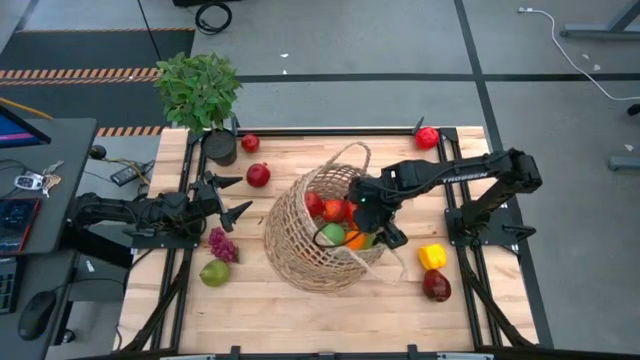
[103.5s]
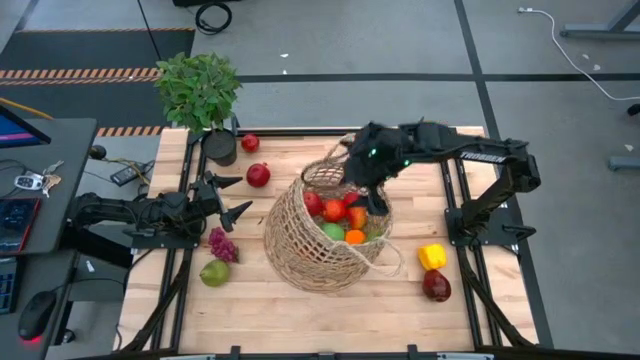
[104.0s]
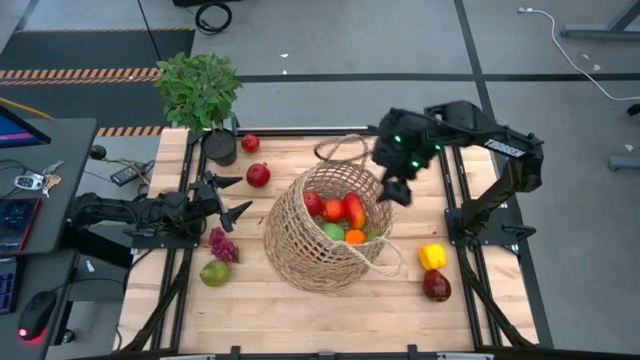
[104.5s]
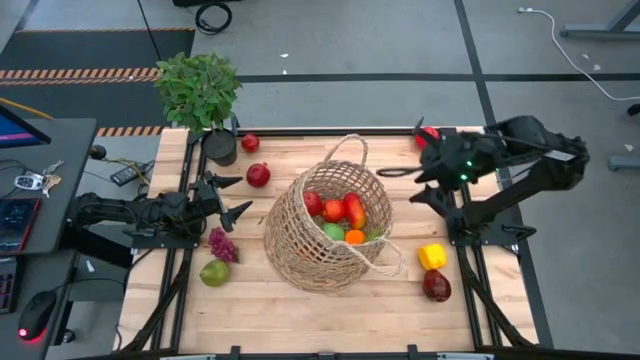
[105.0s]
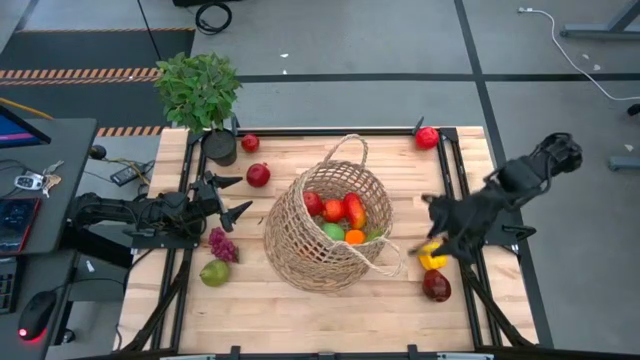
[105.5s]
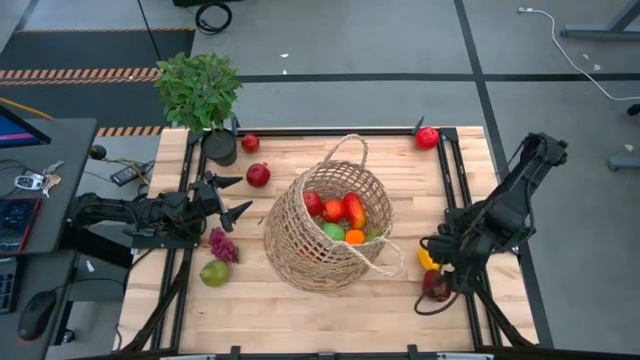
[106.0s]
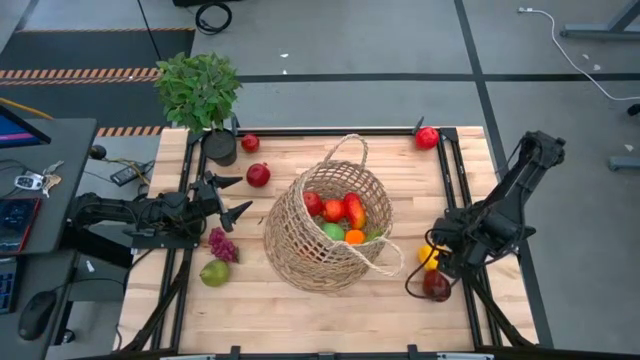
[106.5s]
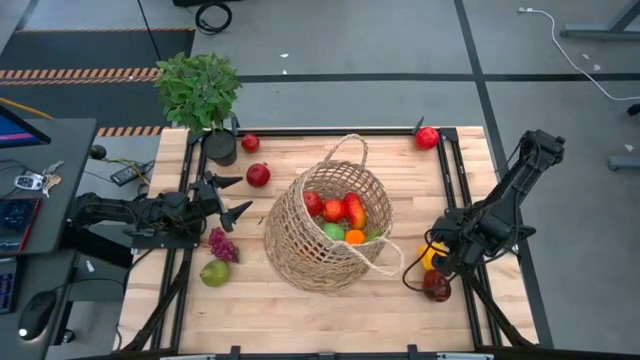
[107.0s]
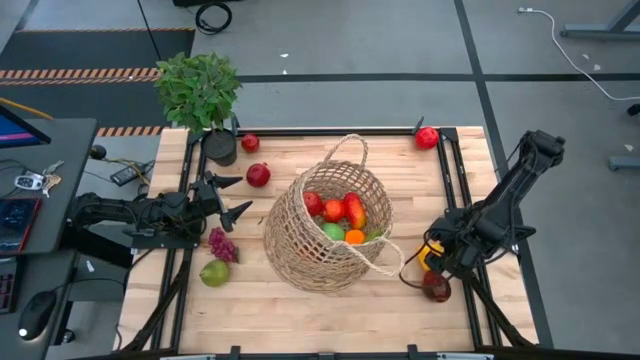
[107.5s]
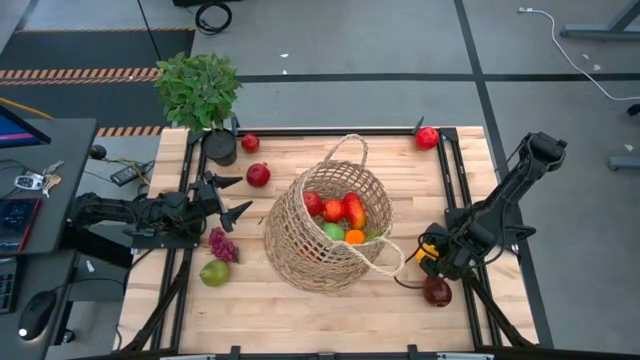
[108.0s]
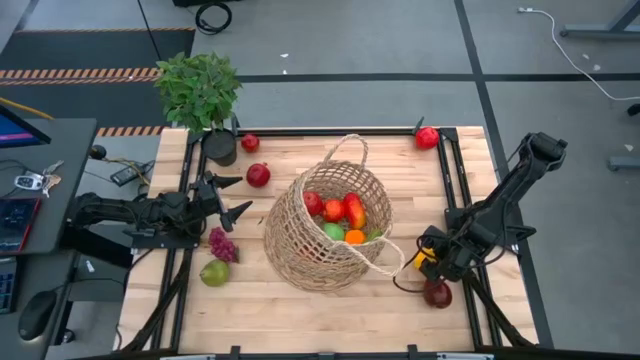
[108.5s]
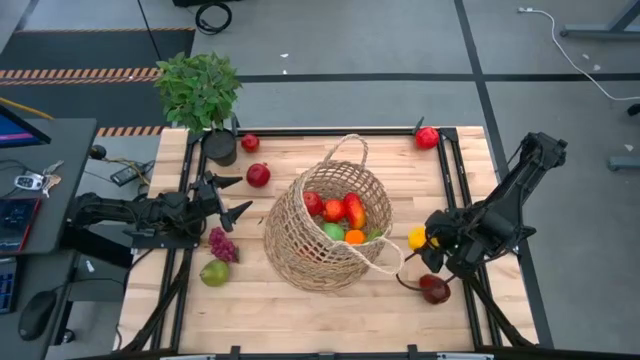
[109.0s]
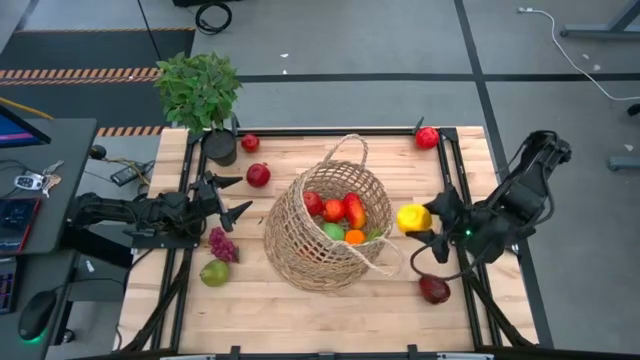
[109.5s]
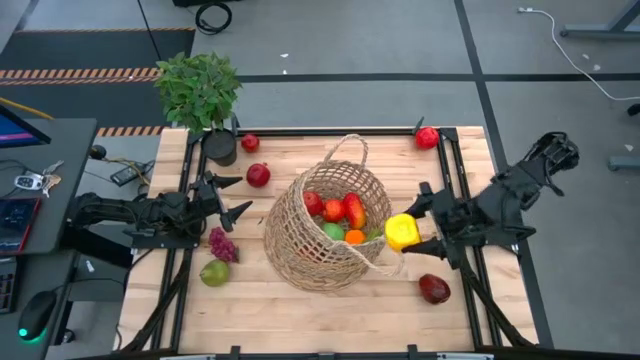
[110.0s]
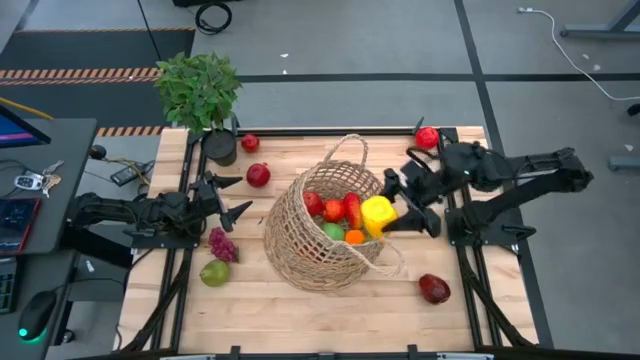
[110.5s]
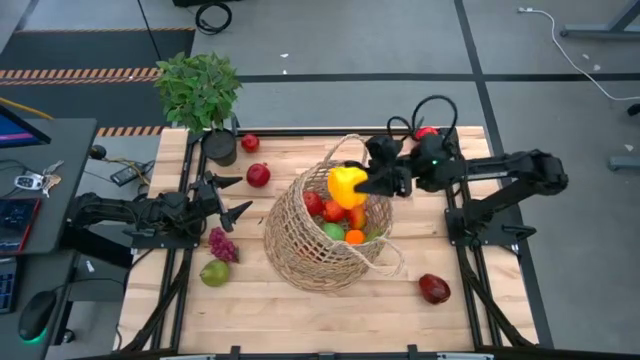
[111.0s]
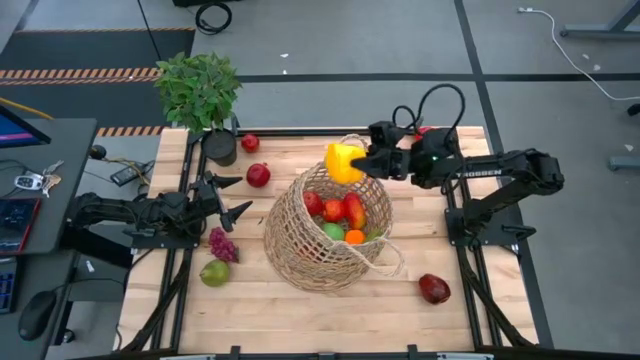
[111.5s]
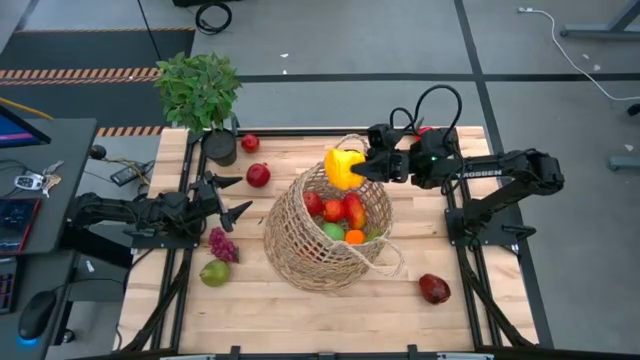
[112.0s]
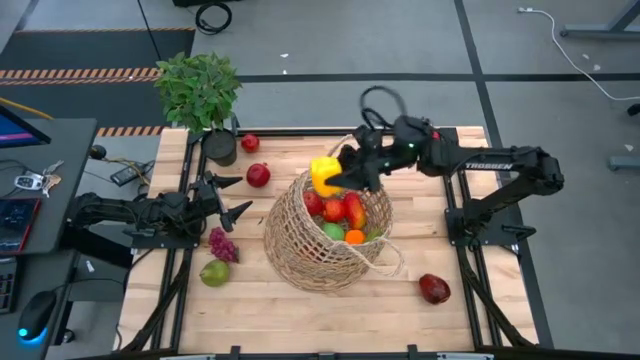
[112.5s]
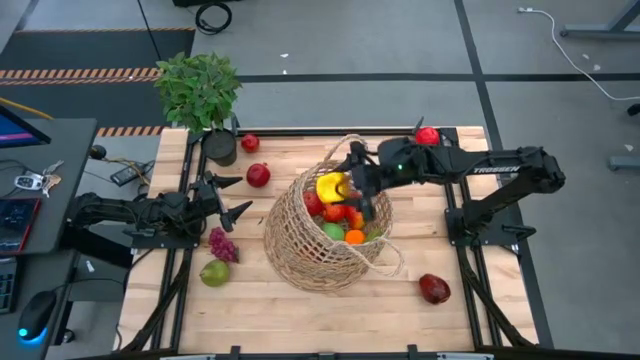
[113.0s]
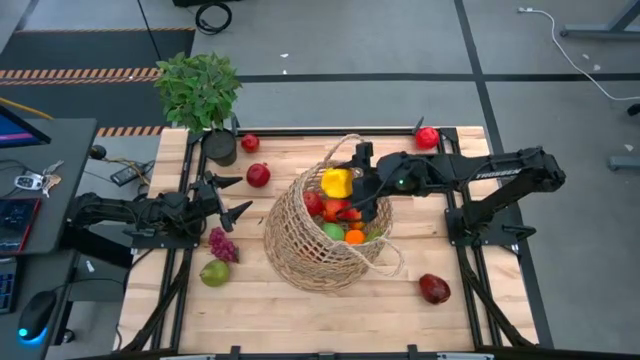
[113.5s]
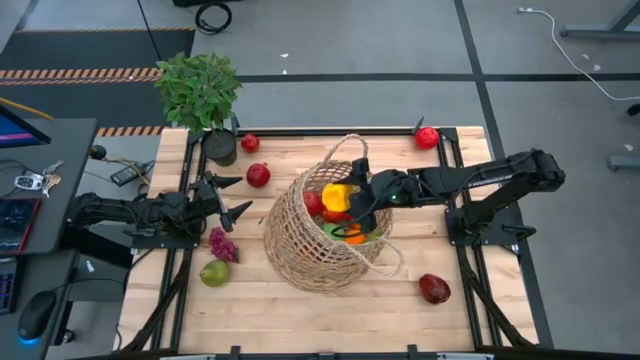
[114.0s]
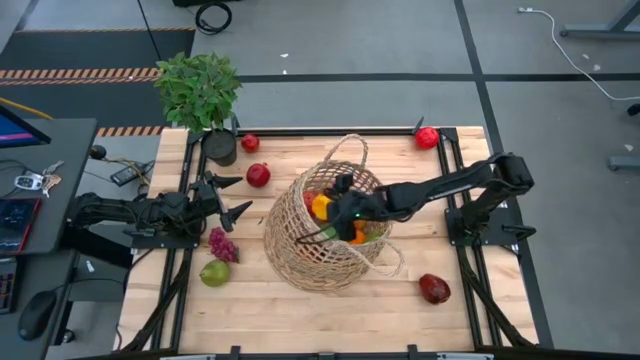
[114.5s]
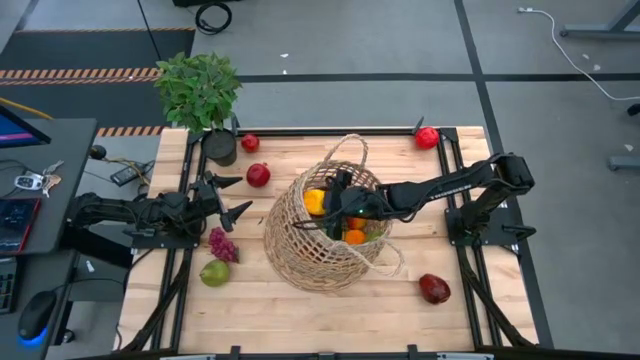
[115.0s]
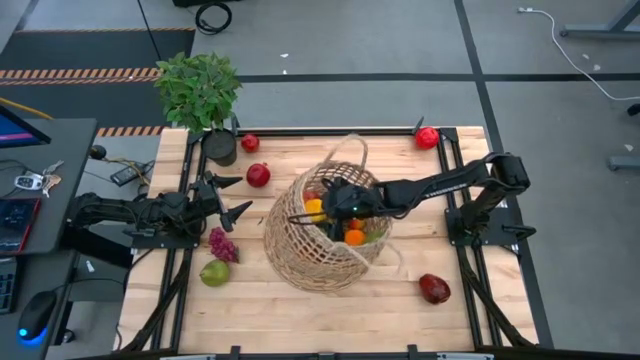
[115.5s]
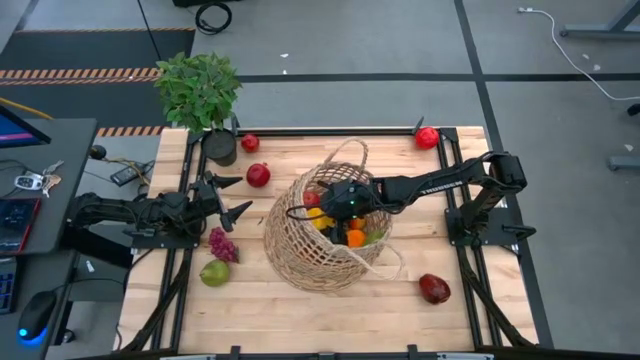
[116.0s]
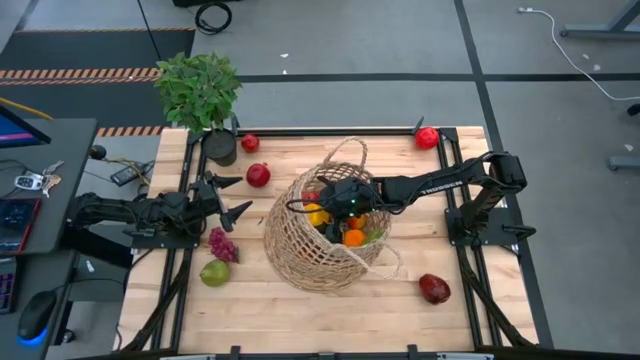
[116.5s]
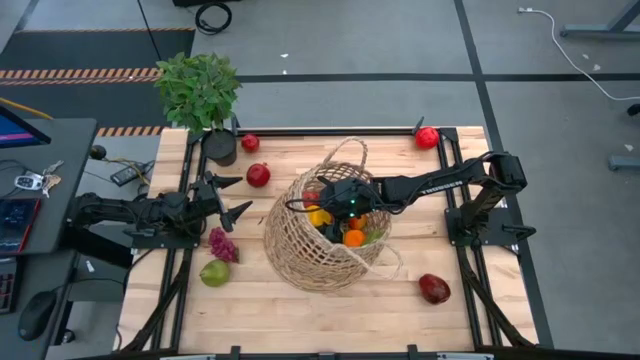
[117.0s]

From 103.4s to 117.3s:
Task: Build produce basket
Put the yellow bell pepper into the brown basket

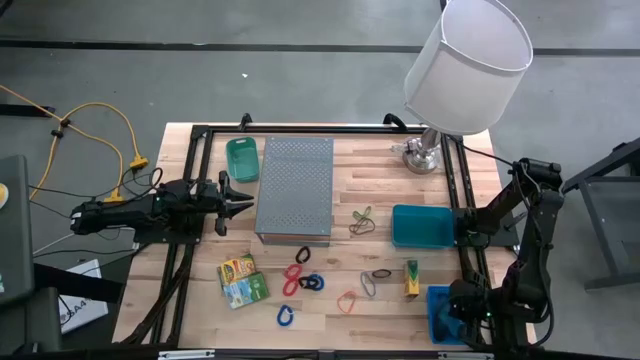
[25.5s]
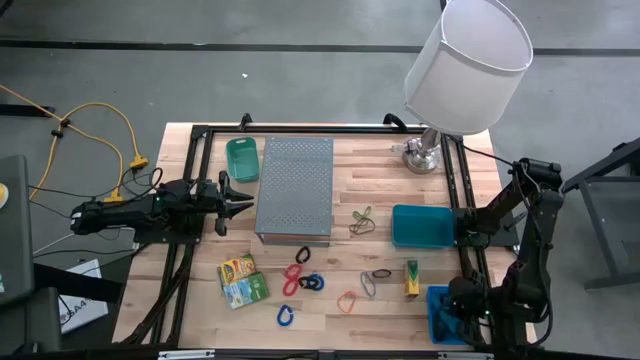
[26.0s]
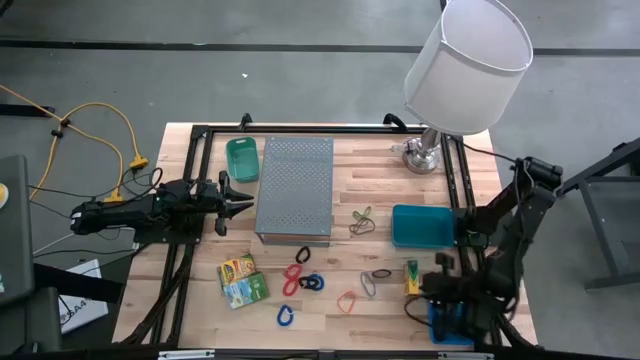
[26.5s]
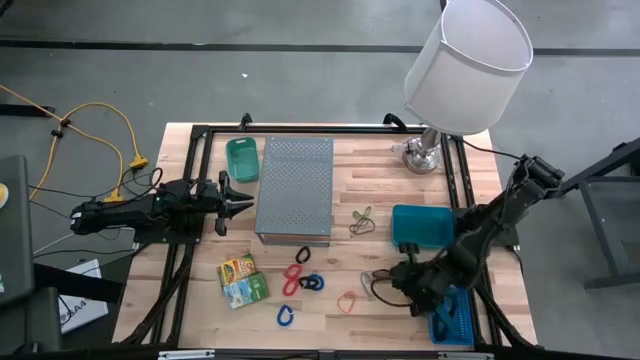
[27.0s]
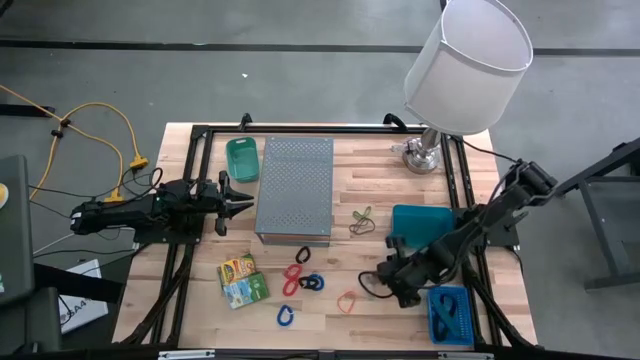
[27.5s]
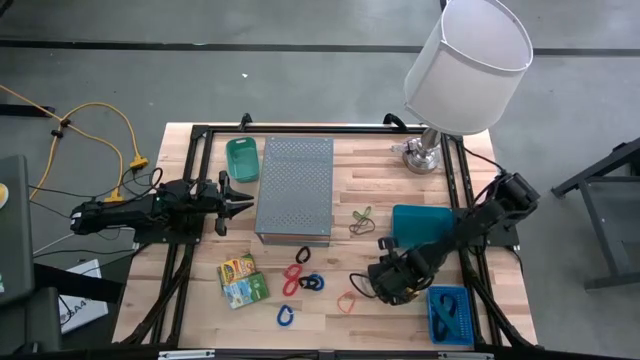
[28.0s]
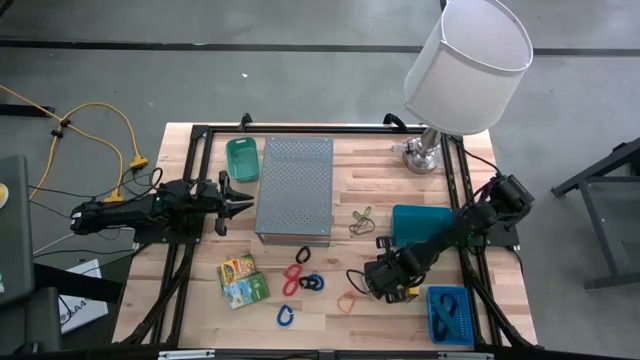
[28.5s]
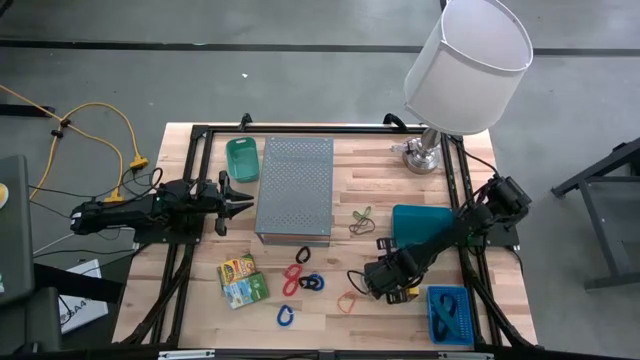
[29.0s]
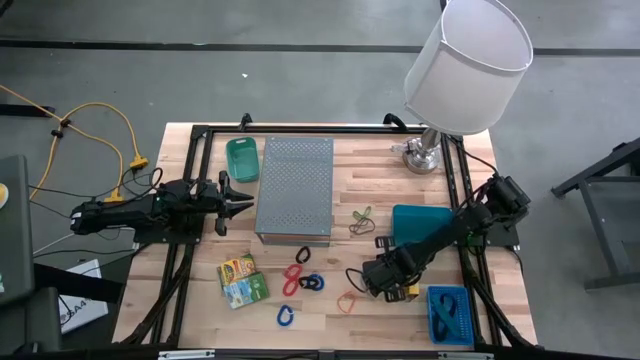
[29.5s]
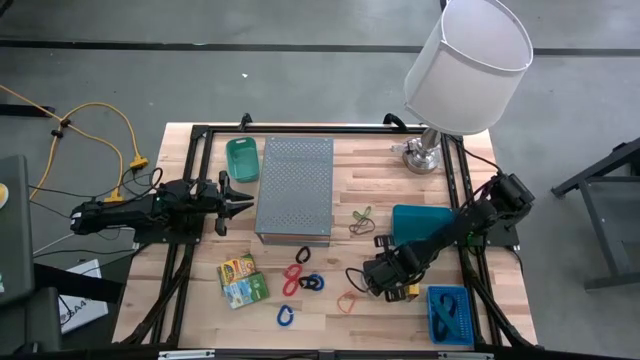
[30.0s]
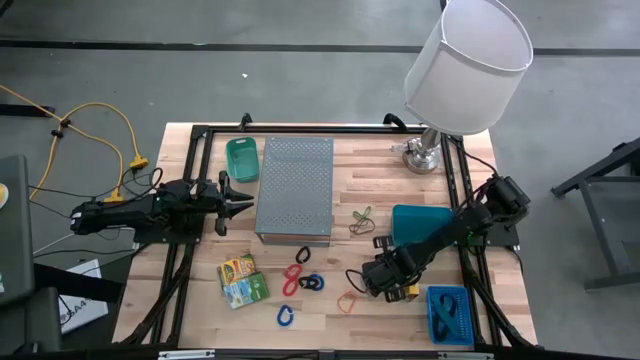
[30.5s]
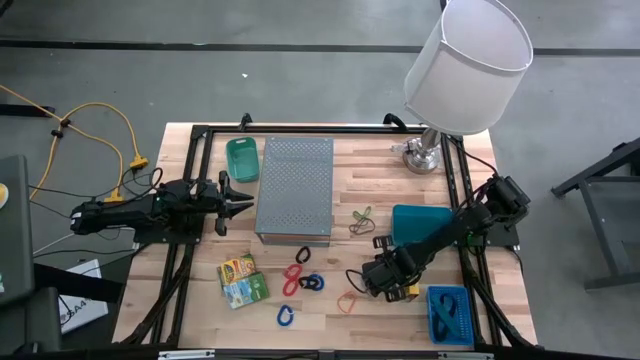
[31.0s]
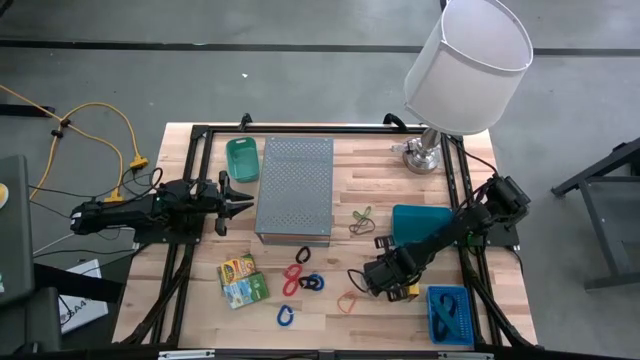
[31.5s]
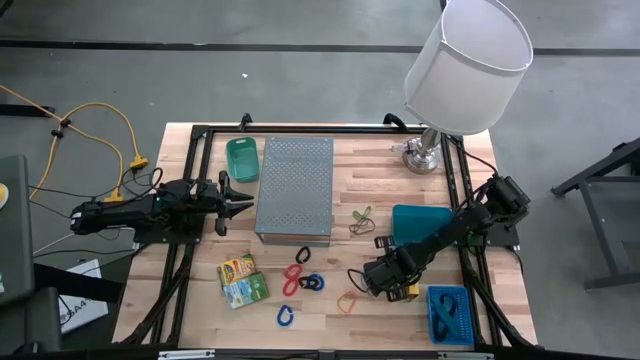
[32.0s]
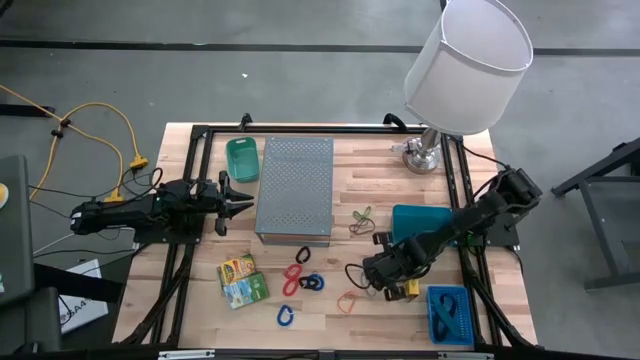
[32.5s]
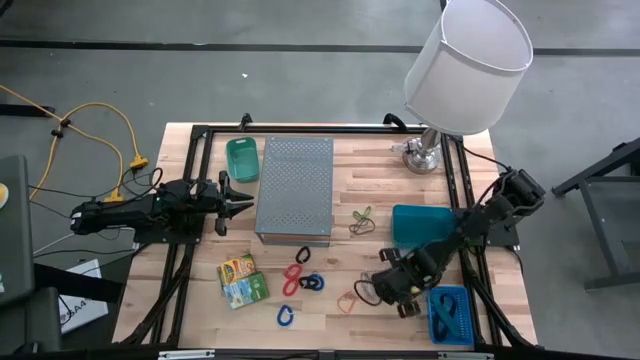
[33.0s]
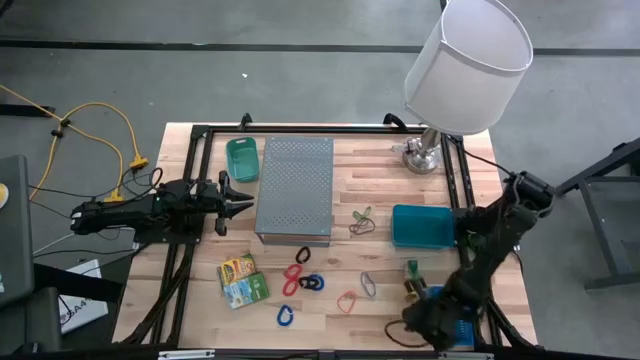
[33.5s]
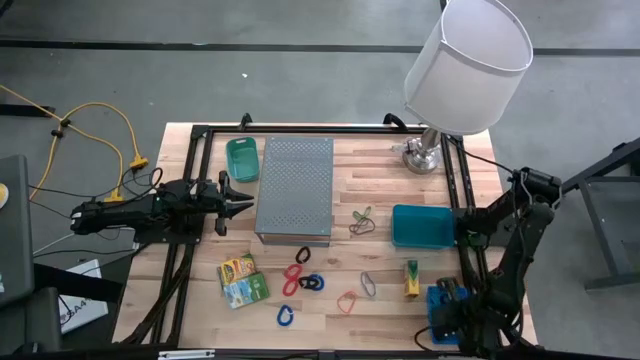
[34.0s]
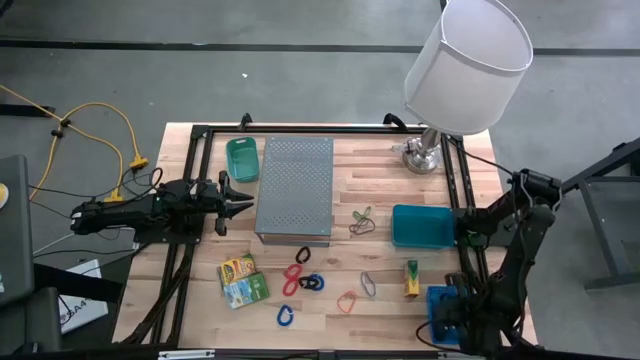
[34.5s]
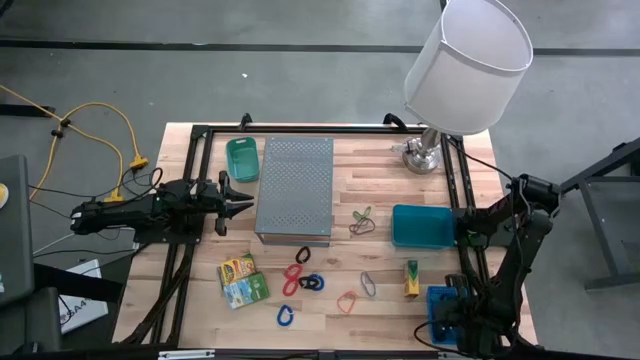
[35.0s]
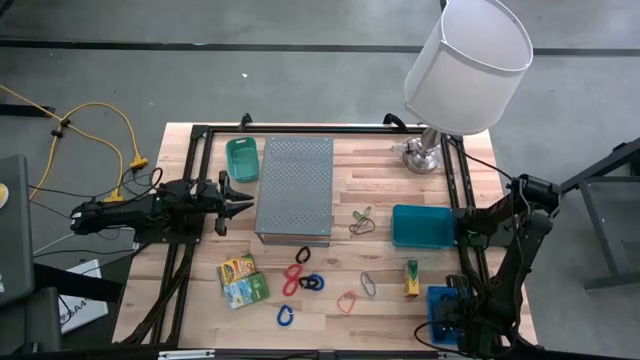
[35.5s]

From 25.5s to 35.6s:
Task: Pick & Place Office Desk Supplies
Put the black rubberband into the blue basket
